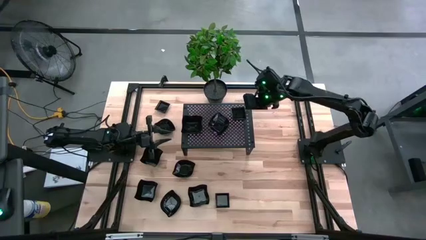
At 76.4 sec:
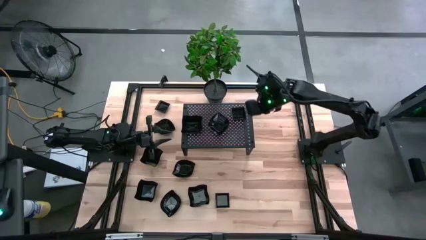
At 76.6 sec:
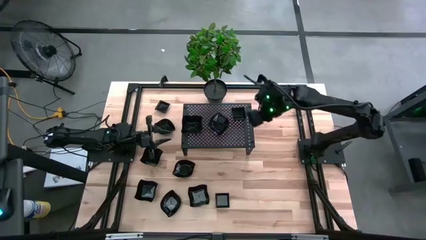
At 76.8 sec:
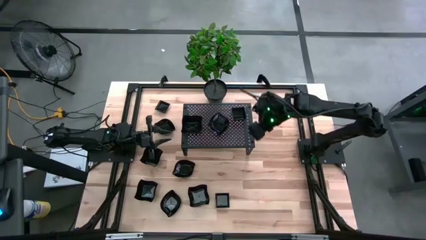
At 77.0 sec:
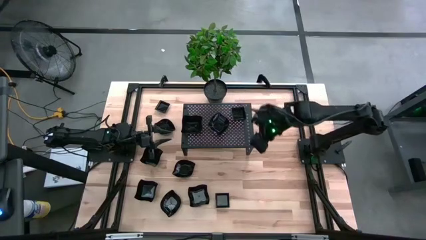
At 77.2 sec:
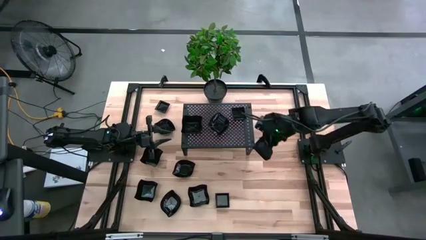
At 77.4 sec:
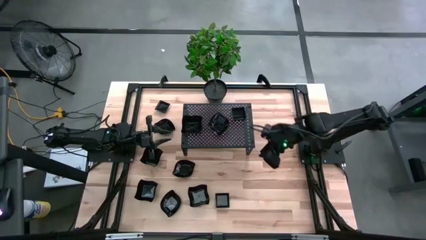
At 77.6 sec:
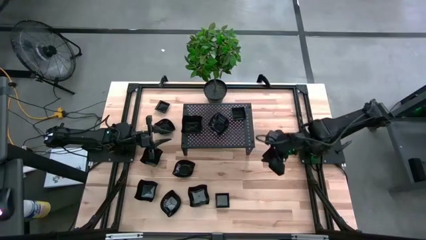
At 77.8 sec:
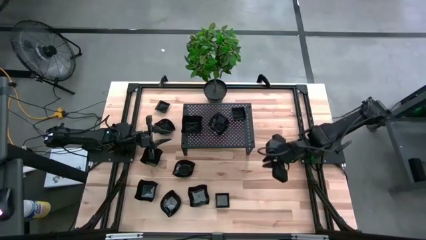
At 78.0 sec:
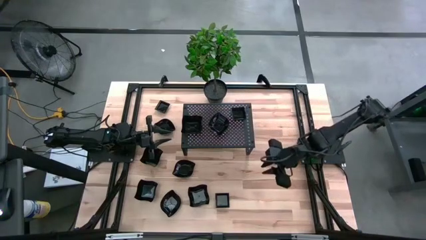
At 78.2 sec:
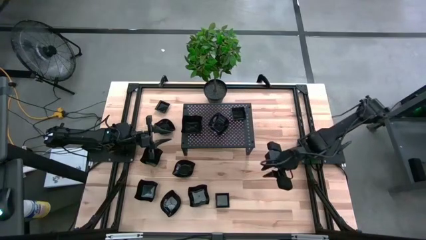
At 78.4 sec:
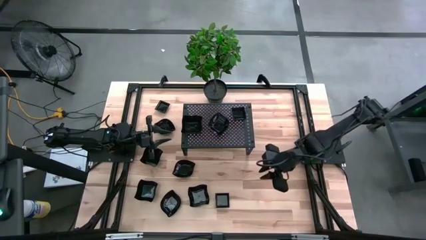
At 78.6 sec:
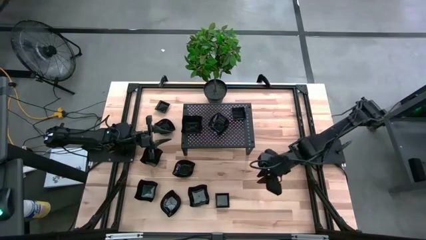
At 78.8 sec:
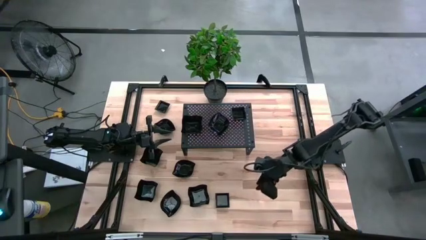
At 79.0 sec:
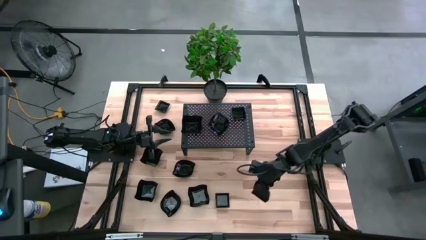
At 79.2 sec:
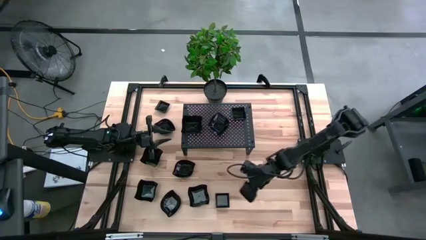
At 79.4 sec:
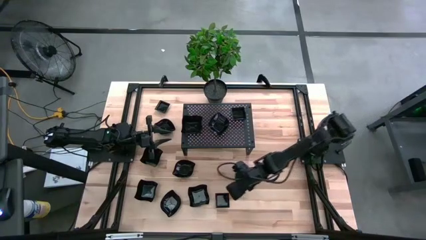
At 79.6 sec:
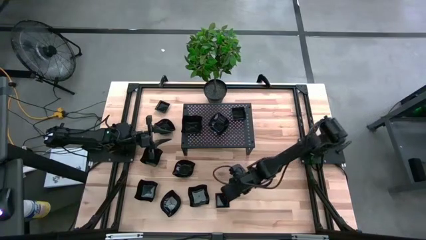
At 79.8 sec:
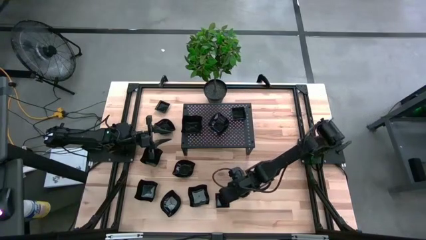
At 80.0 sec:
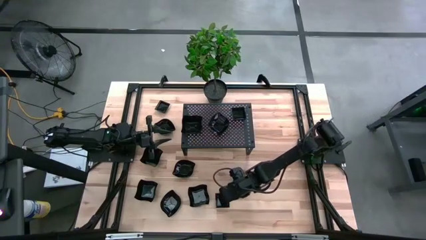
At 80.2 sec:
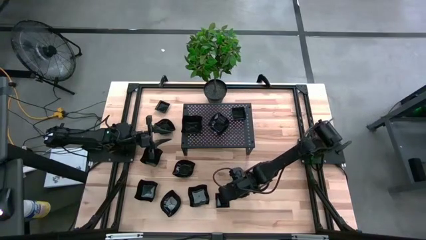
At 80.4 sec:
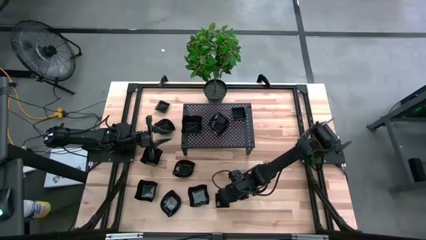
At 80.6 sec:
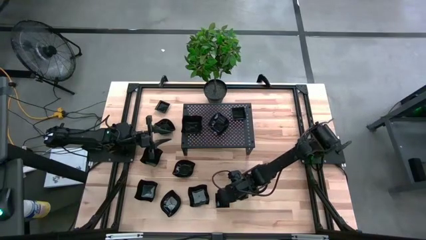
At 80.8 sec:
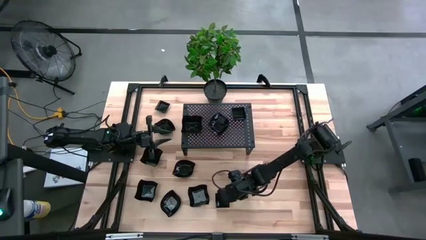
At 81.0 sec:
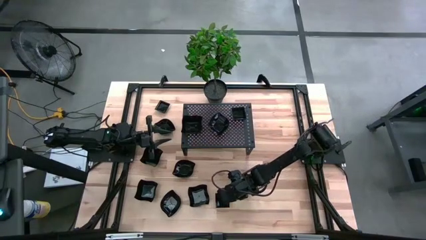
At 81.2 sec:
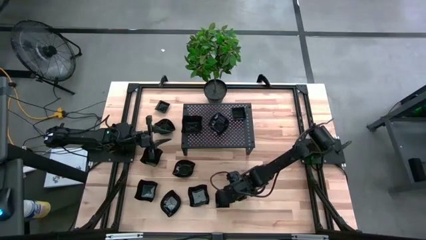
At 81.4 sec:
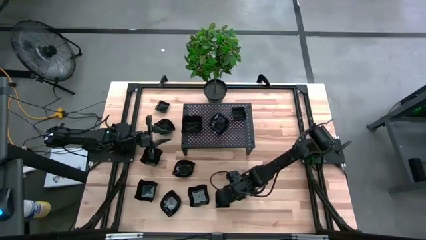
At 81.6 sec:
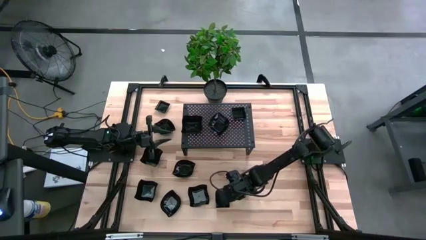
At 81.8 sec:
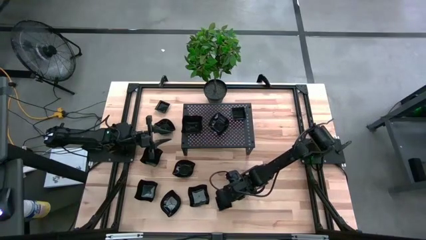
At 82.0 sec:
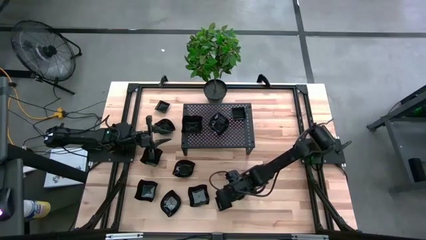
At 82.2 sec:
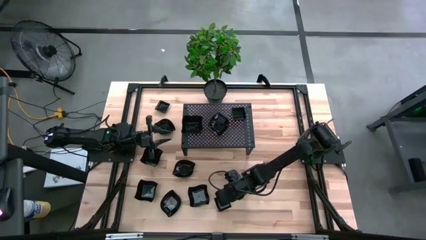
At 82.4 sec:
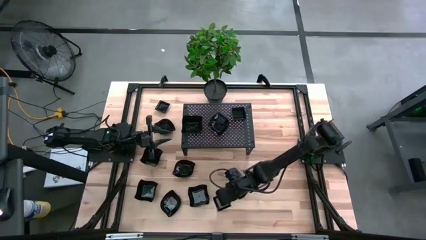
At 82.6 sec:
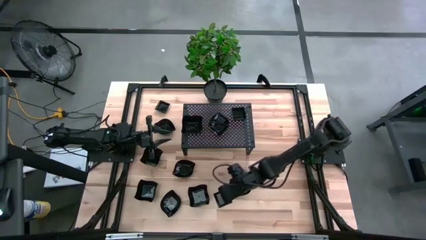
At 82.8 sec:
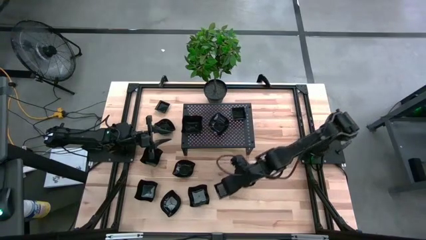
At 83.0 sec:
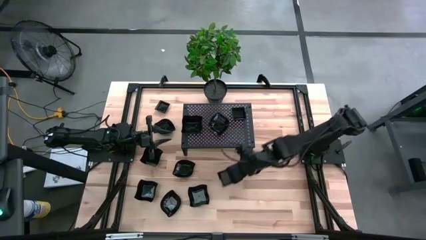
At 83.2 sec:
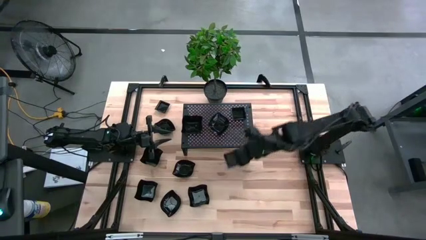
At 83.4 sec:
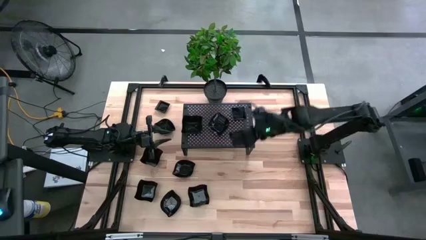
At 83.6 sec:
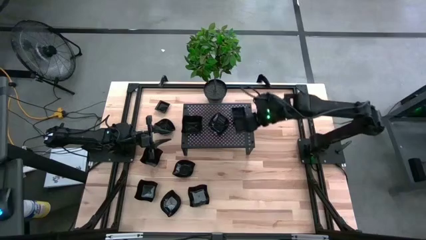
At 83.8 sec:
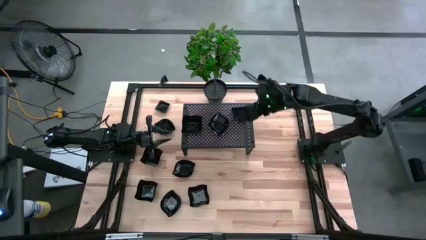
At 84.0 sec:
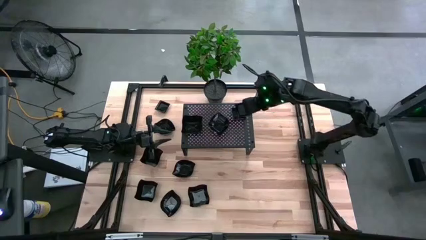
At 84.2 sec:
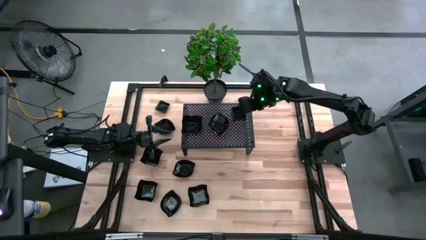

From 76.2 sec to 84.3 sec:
Task: Pick & Place Mini shaped plates
Stack the black square plate on top of the other black square plates on the shelf

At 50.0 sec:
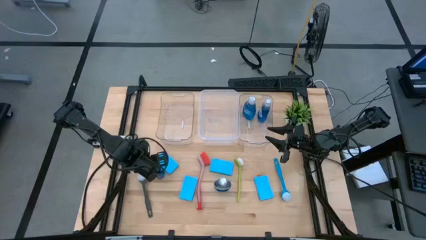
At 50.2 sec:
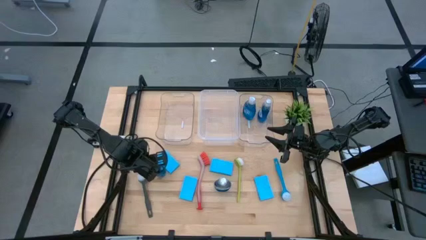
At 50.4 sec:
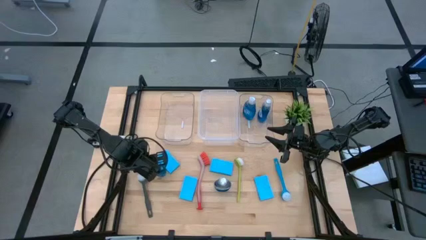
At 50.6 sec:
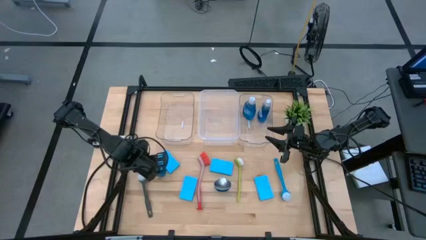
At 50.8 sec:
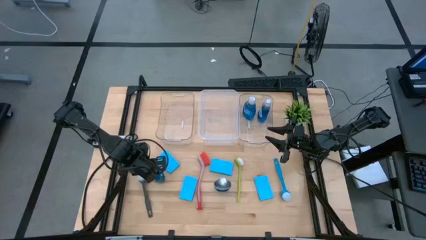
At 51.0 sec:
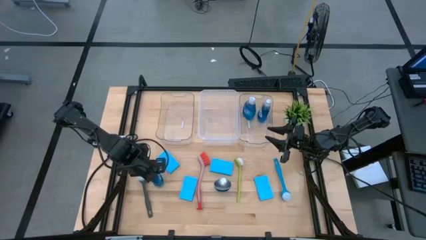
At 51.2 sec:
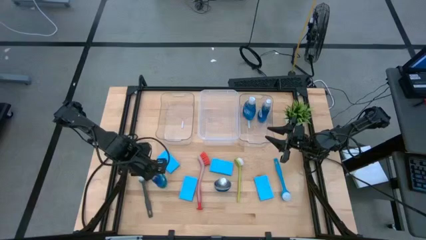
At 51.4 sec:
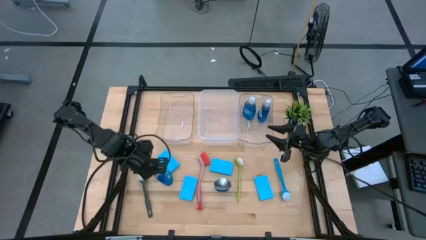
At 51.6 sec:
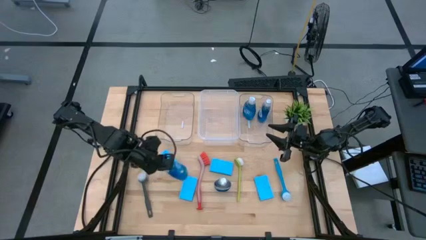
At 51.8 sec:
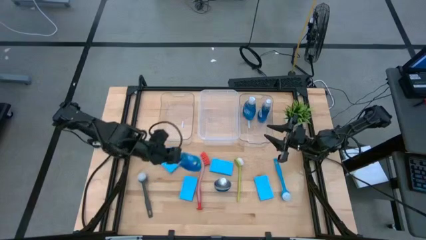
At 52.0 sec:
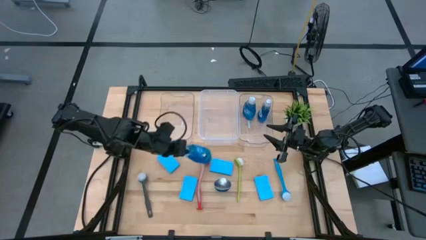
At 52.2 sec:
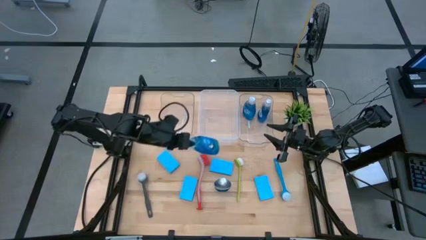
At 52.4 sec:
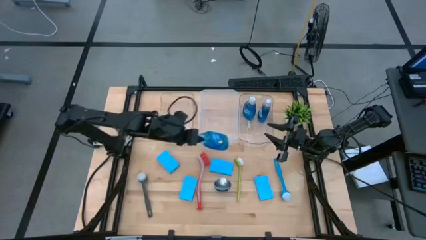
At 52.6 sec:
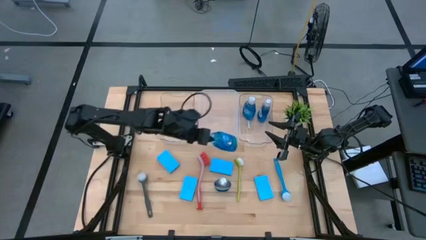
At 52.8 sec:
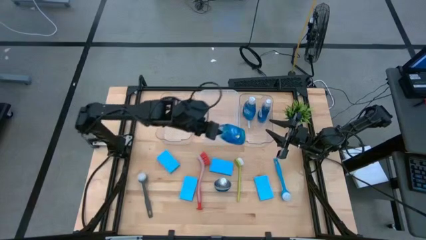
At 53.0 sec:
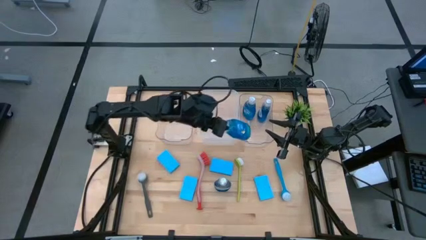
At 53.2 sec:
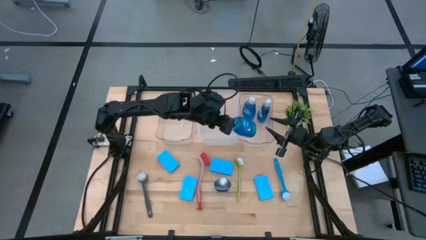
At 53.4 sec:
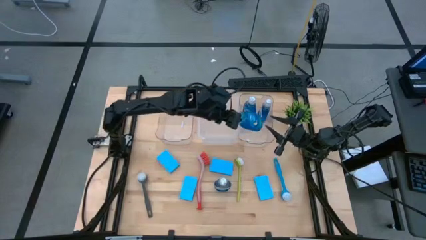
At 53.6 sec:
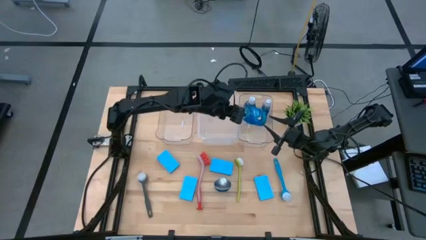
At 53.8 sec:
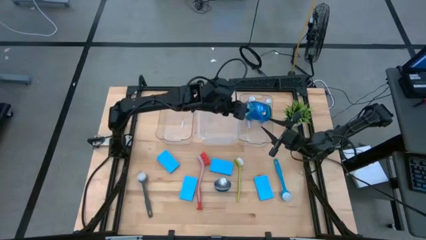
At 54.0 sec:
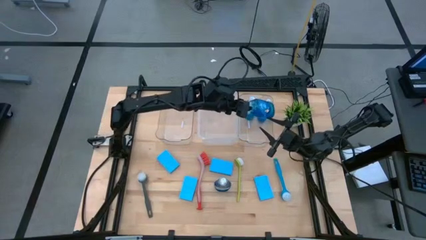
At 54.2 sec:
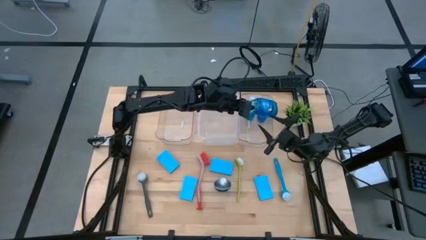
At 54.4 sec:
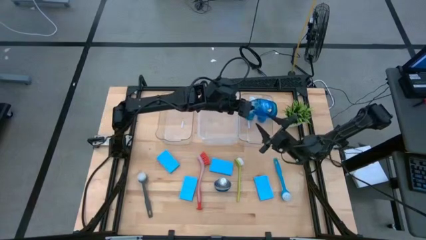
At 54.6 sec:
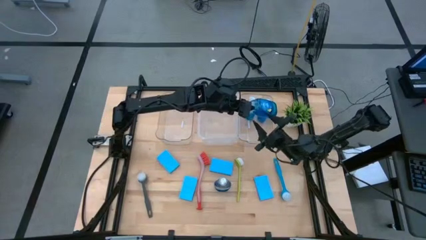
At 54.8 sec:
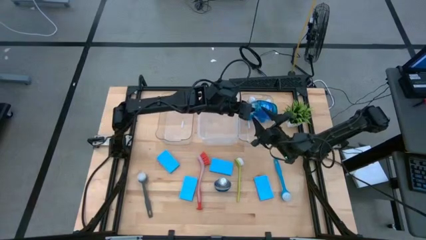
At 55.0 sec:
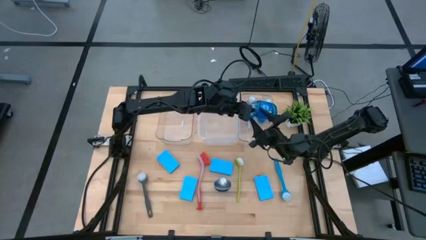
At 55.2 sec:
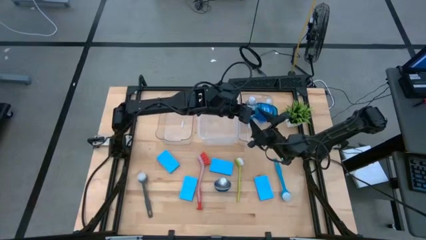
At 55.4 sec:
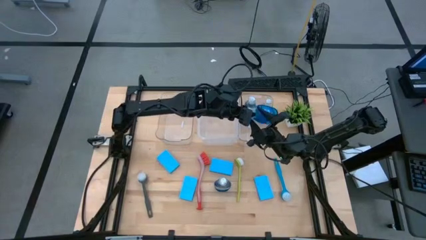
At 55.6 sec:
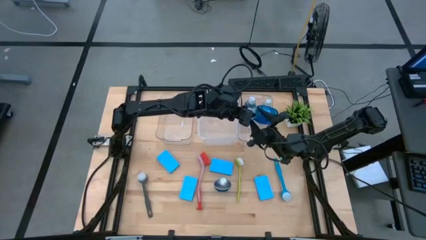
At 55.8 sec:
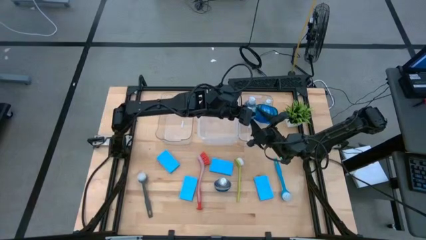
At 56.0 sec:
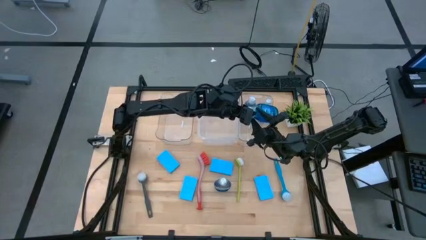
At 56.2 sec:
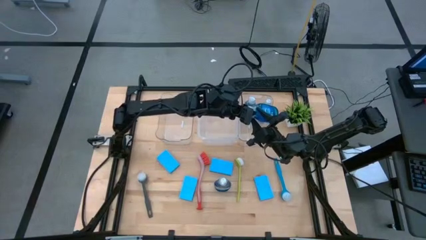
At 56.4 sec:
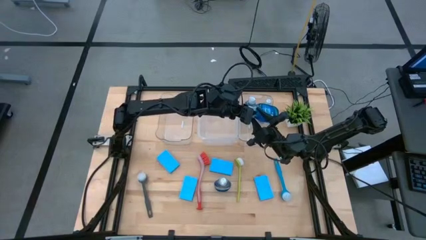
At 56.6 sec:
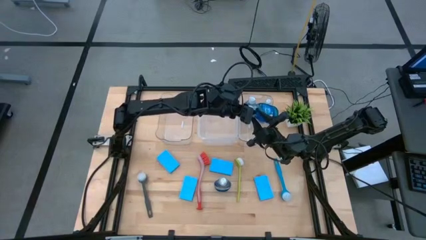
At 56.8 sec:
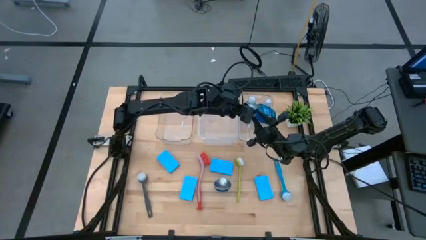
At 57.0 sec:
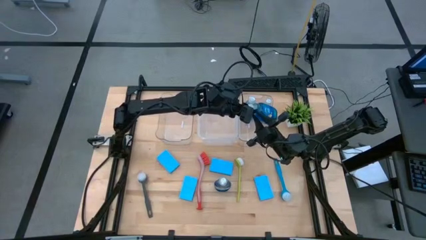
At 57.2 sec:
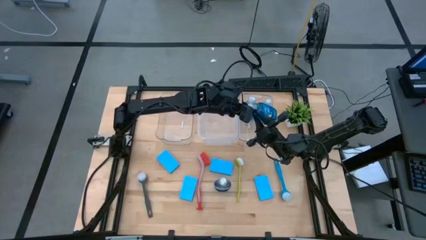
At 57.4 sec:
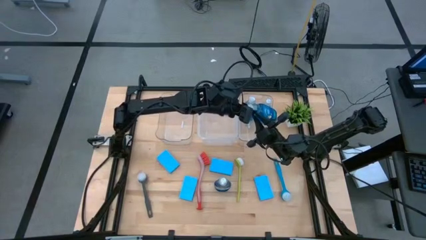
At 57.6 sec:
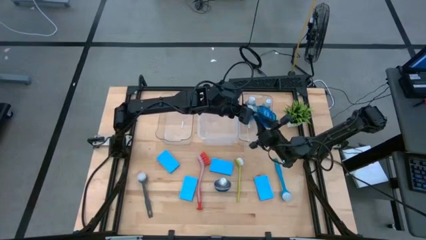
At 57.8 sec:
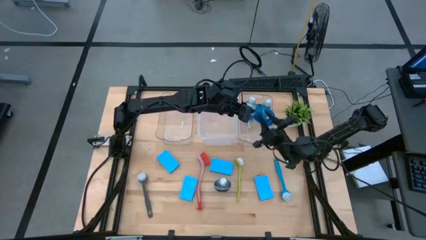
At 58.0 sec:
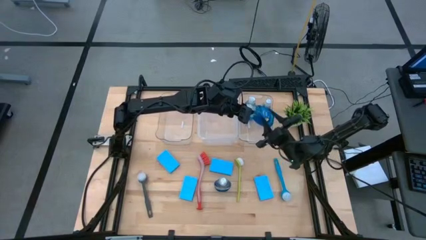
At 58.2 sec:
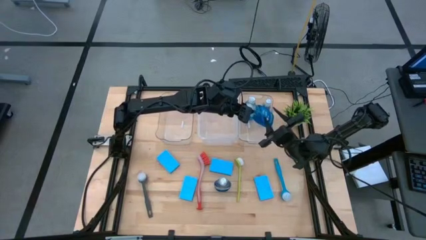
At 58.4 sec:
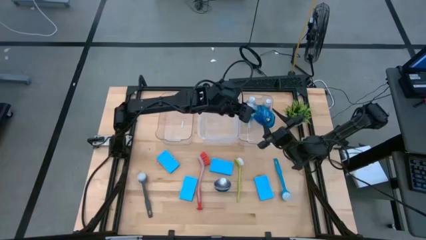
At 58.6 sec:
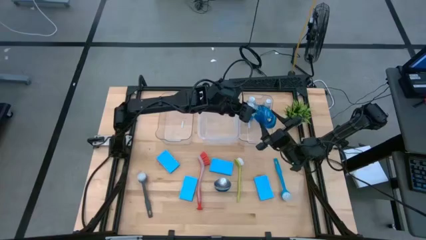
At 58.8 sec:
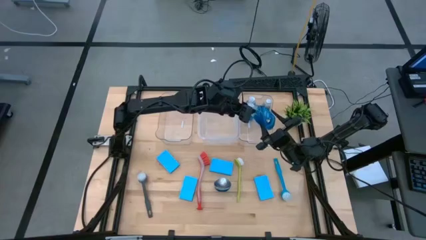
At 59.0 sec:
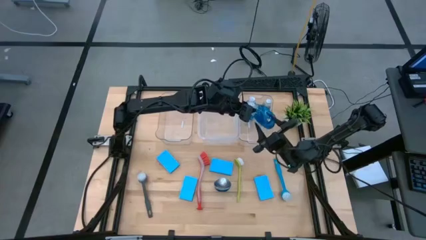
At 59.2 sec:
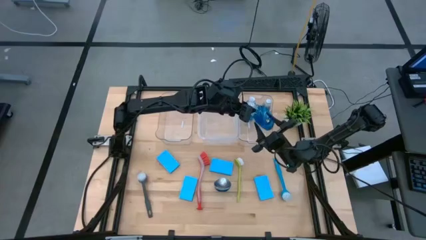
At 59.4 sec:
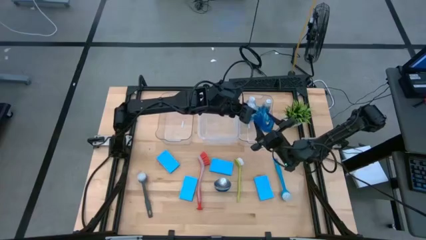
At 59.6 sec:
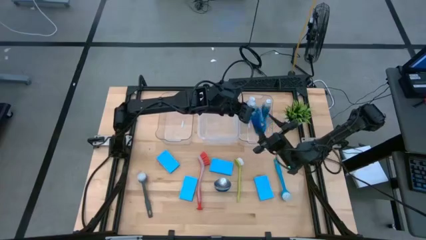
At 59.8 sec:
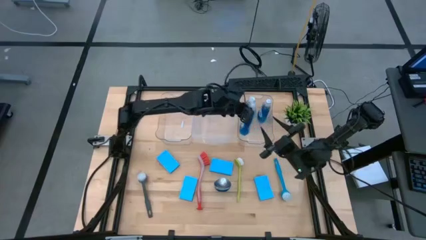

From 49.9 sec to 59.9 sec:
Task: Pick & Place Kitchen Sink Supplies
Put the dishwashing liquid into the right transparent bin
